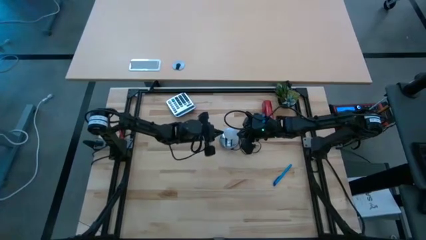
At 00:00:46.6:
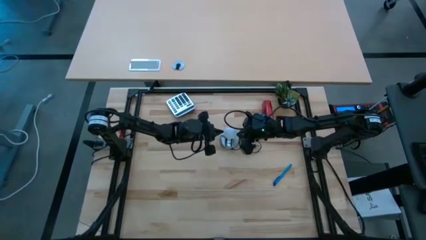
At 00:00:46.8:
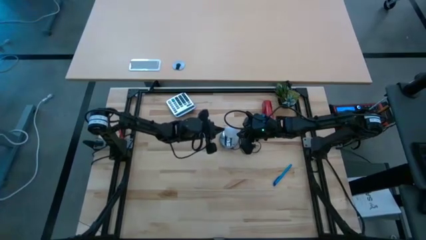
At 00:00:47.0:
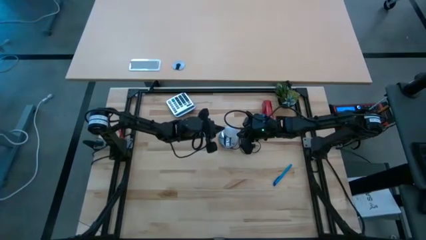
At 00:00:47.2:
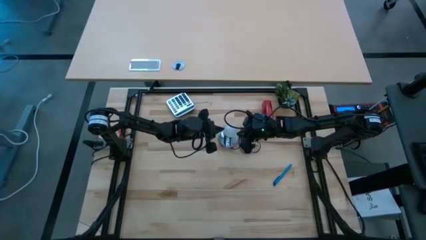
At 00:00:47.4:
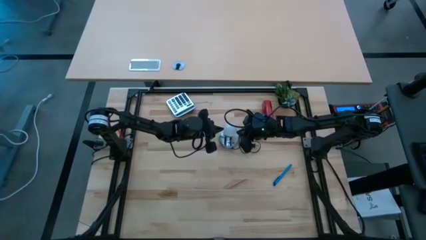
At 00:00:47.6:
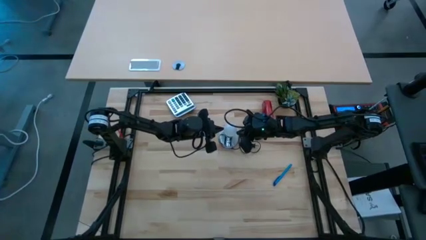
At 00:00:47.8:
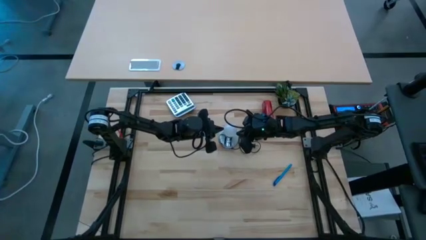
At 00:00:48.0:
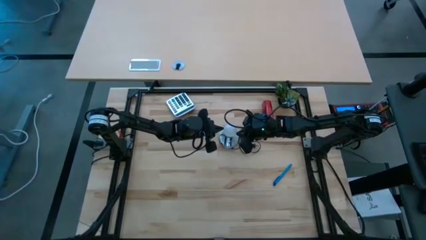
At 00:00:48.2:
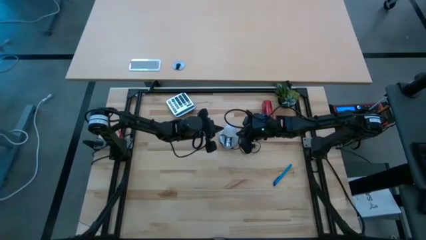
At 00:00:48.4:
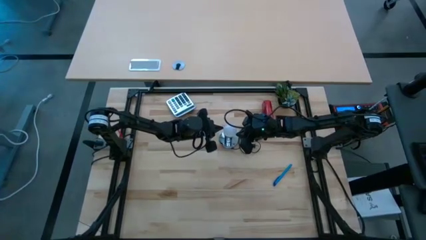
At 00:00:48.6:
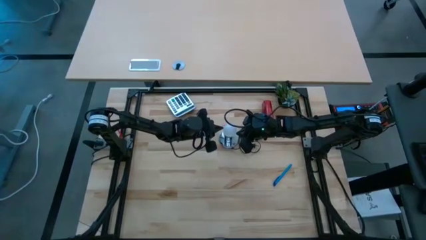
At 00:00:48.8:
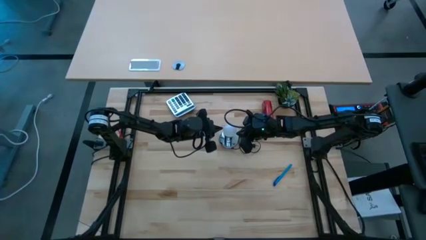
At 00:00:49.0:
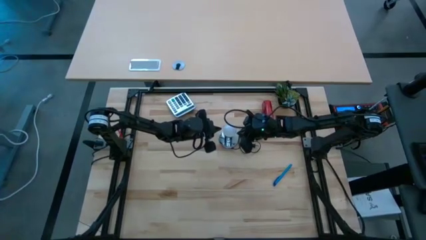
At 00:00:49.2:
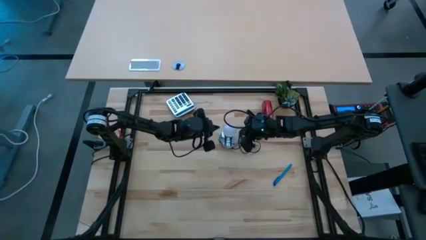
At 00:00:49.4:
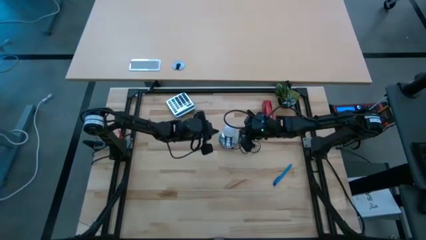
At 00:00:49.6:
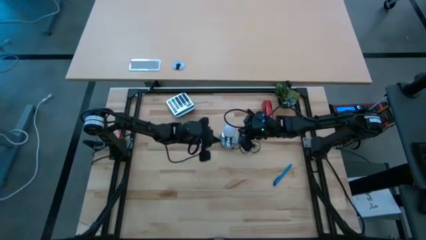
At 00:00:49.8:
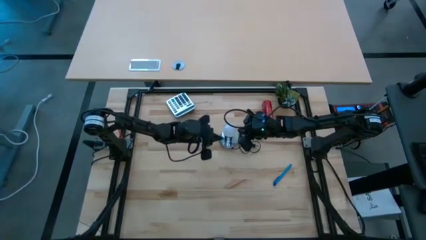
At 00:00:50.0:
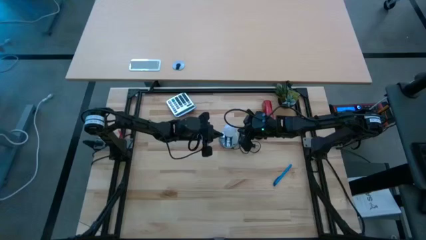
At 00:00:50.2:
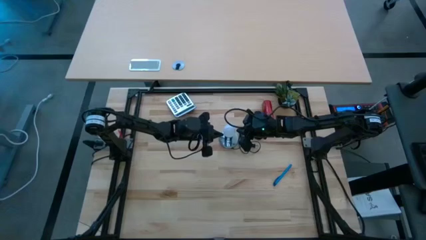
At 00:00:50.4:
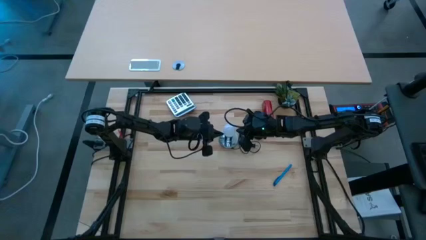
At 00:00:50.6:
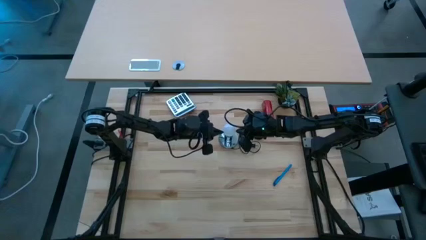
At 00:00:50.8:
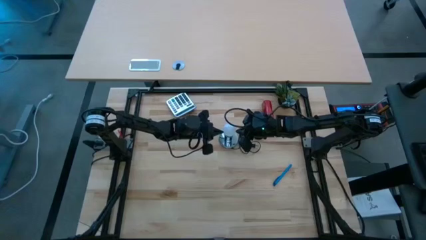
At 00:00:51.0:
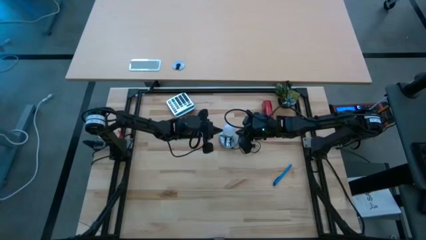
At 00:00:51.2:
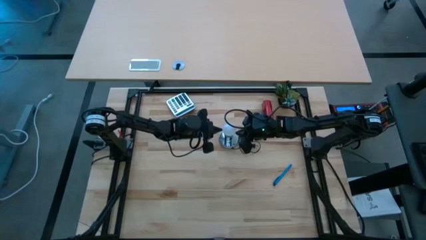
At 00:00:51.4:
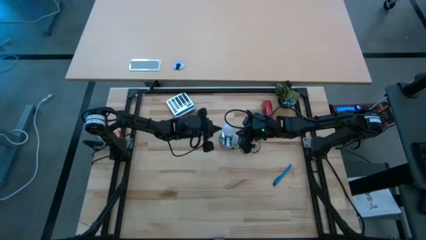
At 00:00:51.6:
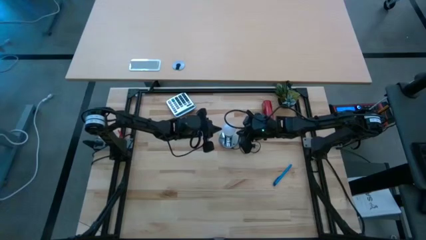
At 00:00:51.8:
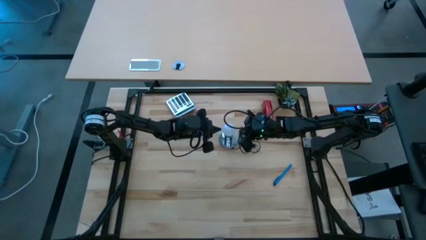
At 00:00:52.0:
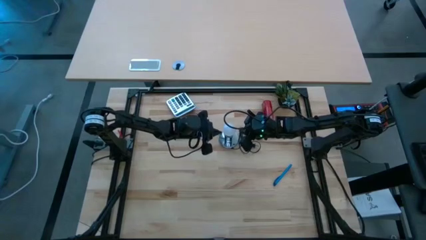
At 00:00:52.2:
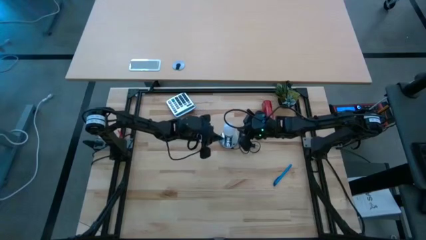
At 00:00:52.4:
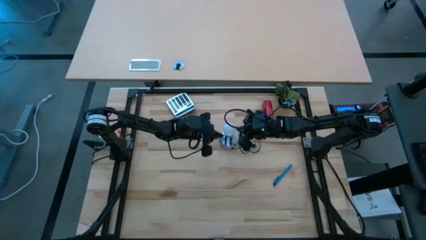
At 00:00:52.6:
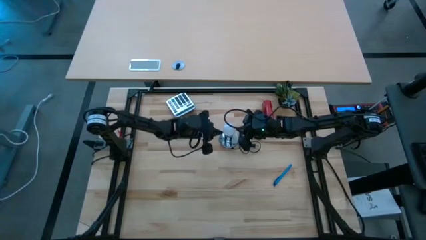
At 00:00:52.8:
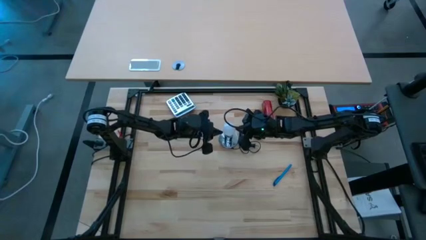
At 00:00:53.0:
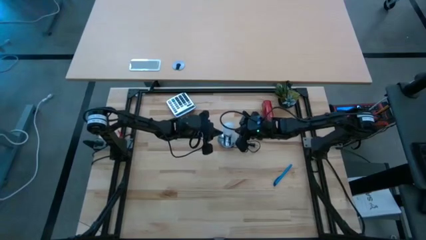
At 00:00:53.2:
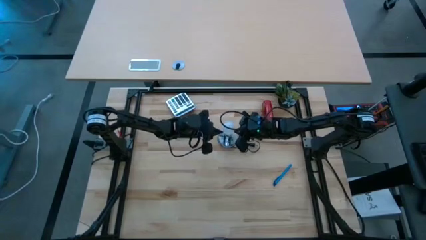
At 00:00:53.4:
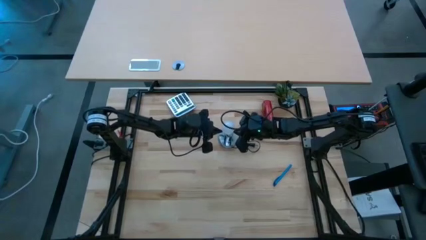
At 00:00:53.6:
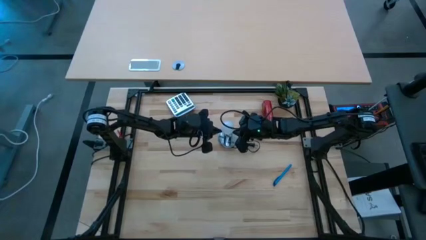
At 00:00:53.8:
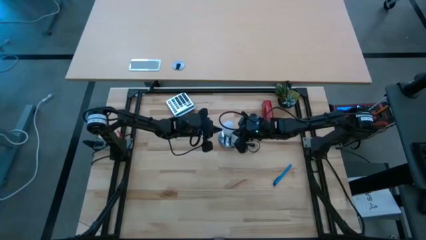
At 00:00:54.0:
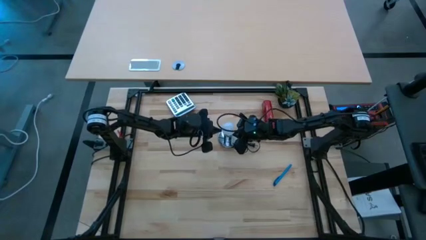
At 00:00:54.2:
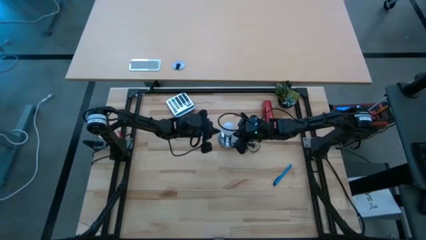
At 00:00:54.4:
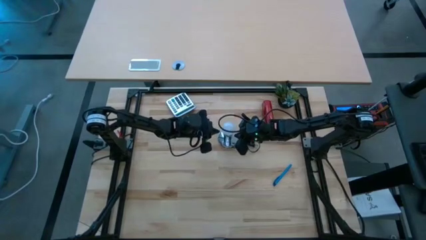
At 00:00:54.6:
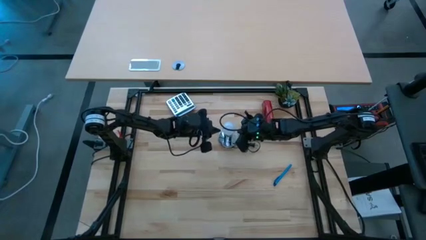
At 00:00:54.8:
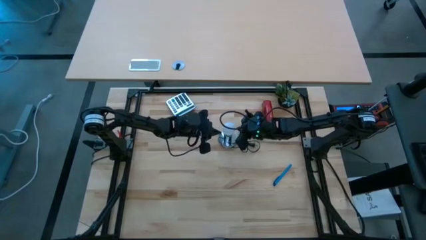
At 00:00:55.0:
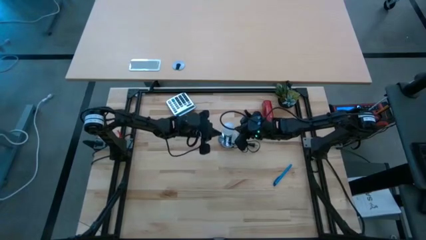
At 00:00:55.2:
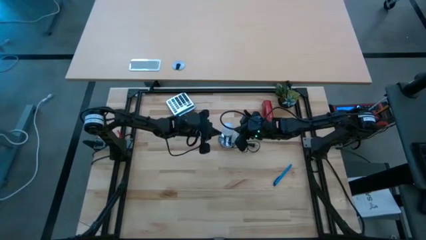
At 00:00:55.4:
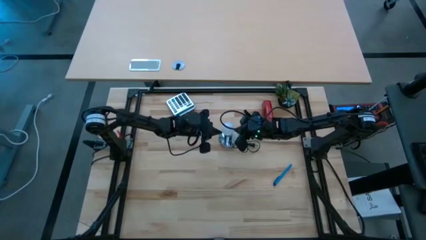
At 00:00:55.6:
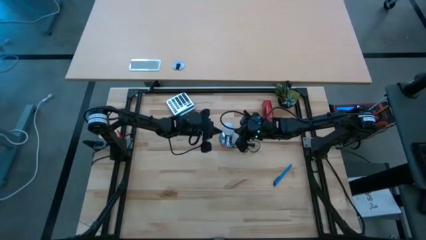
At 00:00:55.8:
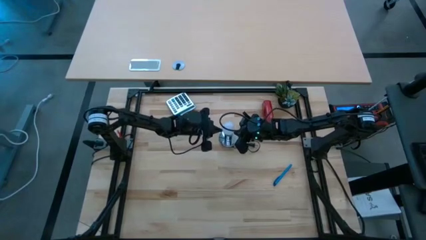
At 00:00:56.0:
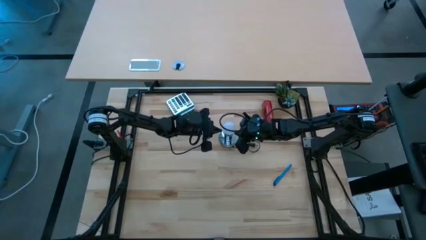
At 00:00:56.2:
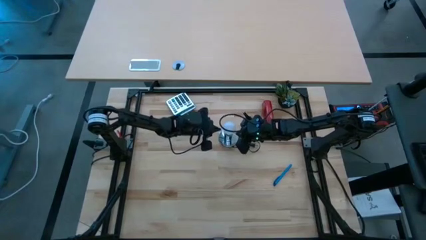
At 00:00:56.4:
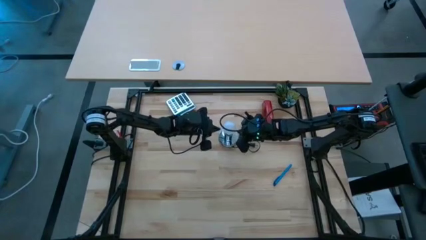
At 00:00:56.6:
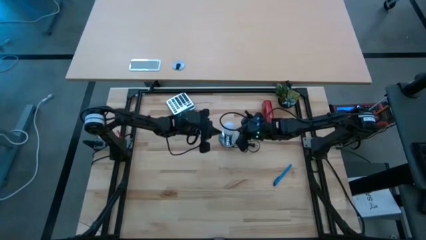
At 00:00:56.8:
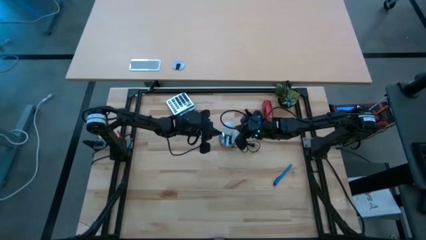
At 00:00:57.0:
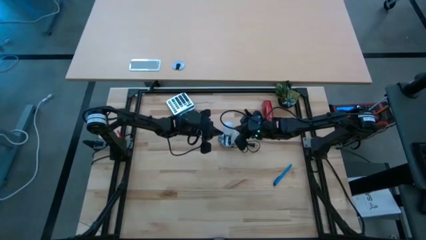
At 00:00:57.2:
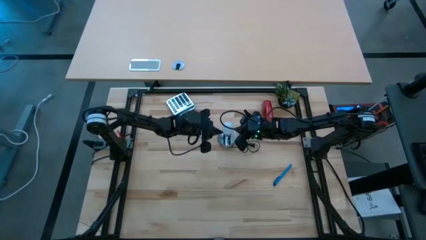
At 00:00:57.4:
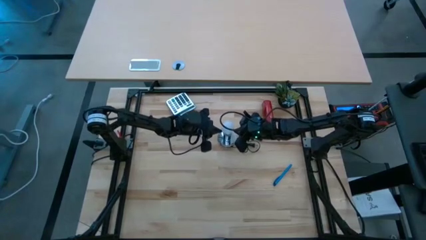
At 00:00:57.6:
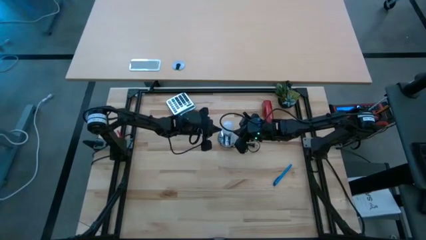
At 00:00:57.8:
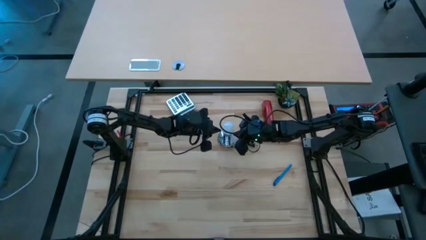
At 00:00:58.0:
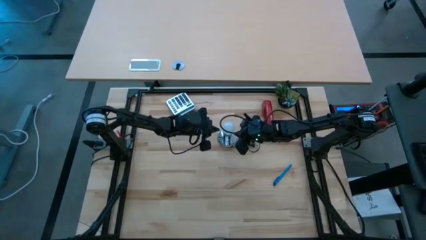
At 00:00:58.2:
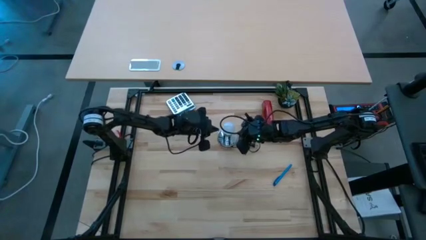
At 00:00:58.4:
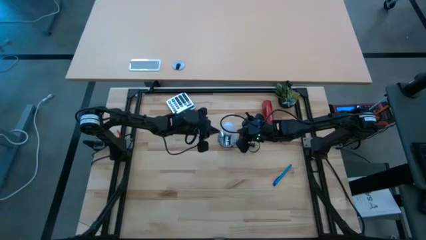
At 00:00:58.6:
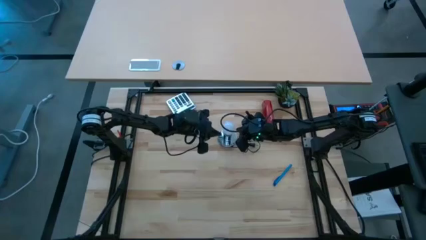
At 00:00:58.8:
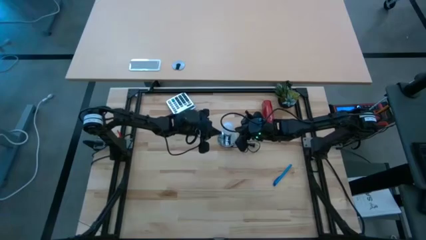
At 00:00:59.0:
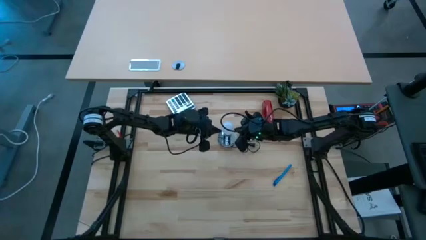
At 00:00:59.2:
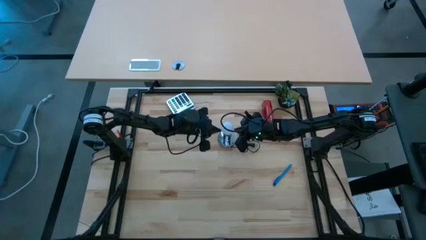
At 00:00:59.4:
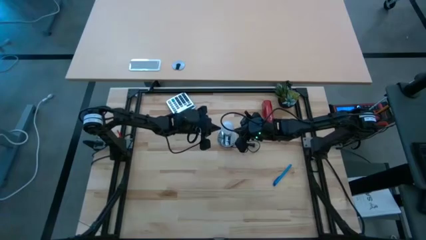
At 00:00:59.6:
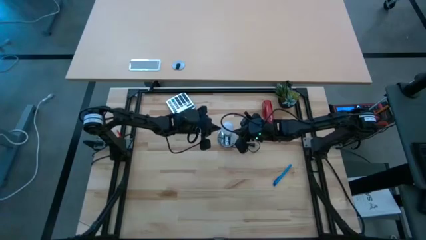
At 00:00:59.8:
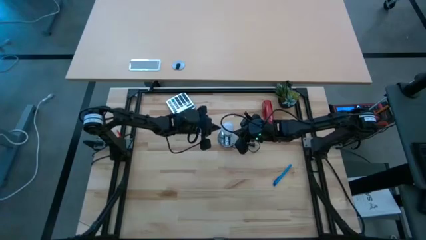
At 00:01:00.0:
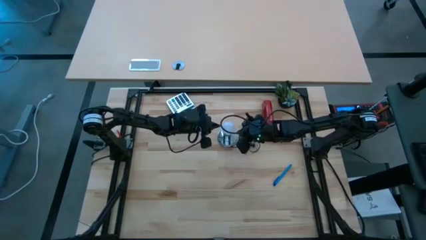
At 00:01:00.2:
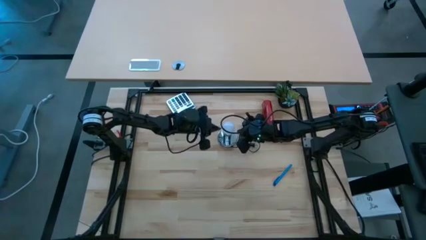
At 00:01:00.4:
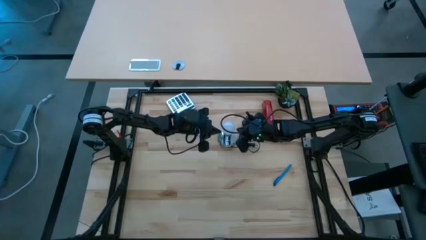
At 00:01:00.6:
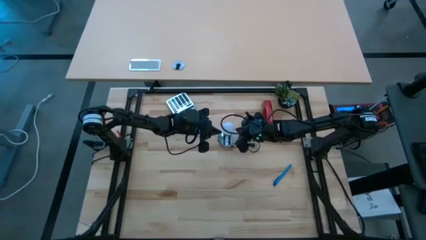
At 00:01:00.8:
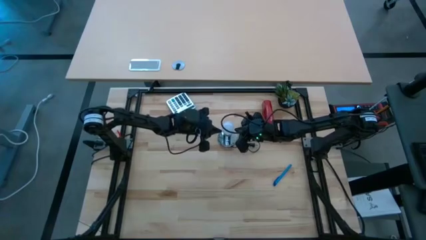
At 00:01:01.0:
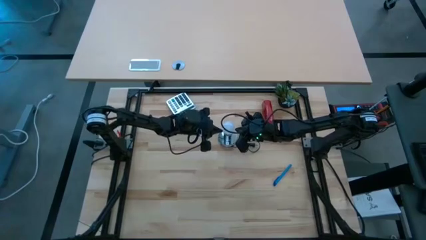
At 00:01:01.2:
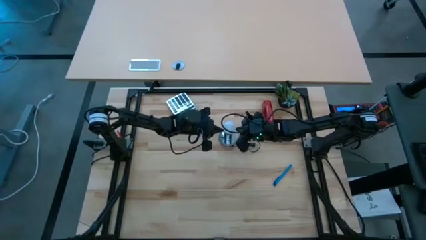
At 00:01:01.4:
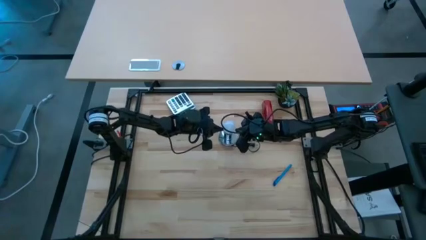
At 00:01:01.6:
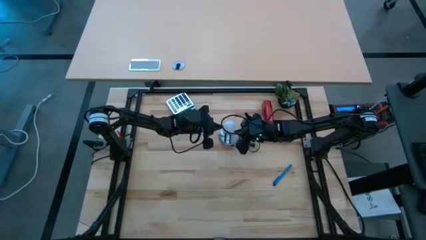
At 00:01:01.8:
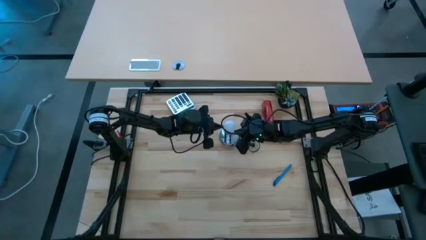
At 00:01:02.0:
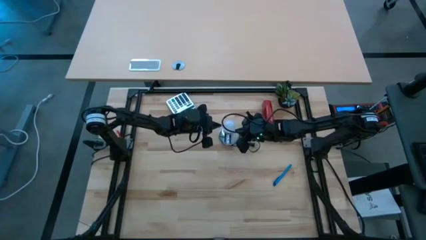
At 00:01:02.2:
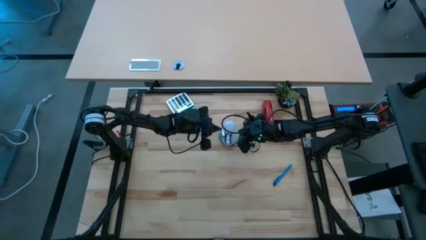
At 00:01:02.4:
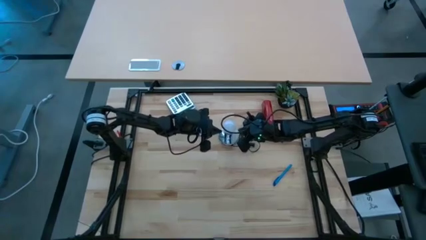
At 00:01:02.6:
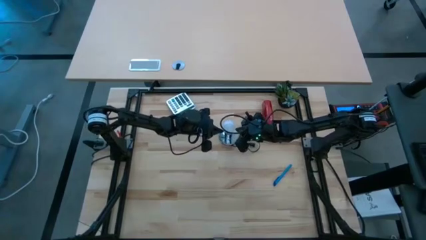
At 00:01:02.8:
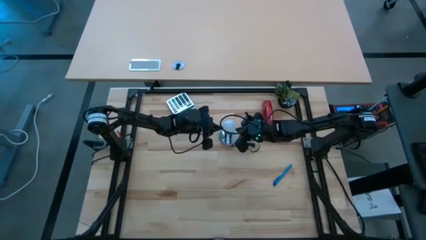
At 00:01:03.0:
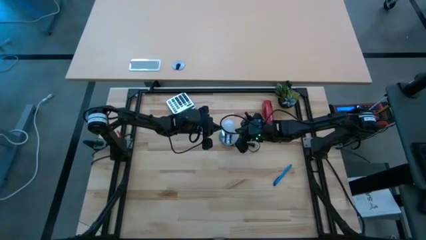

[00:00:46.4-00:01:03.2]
Task: Screw lightbulb
Insert the white lightbulb into the silver lamp
